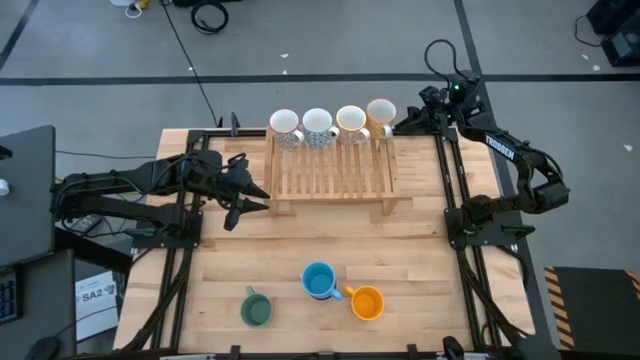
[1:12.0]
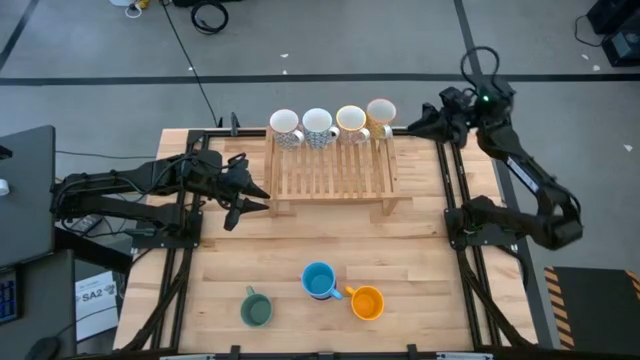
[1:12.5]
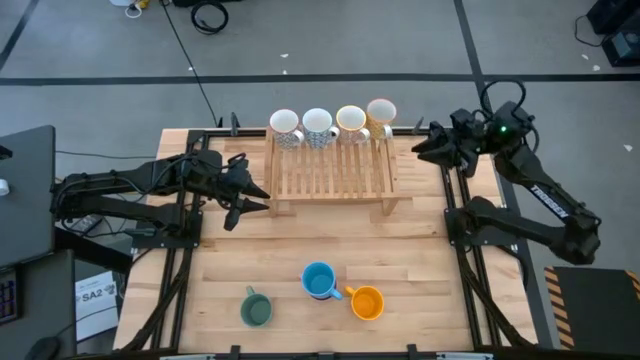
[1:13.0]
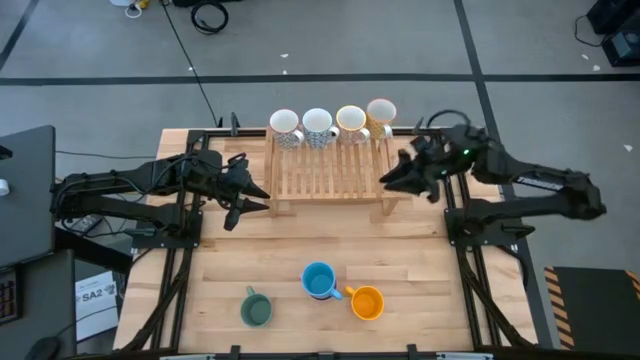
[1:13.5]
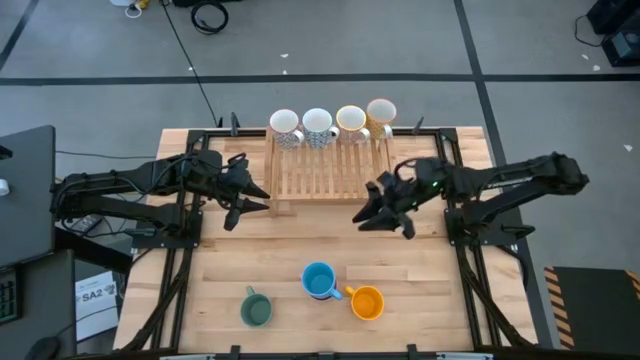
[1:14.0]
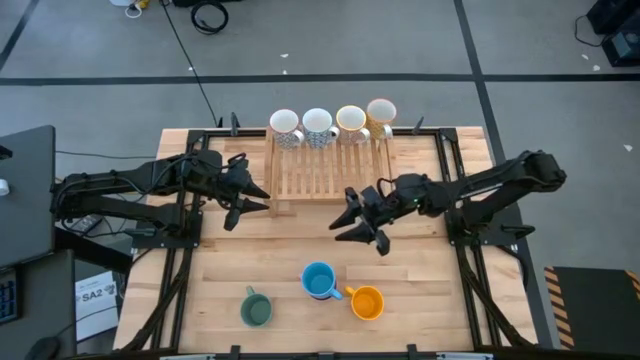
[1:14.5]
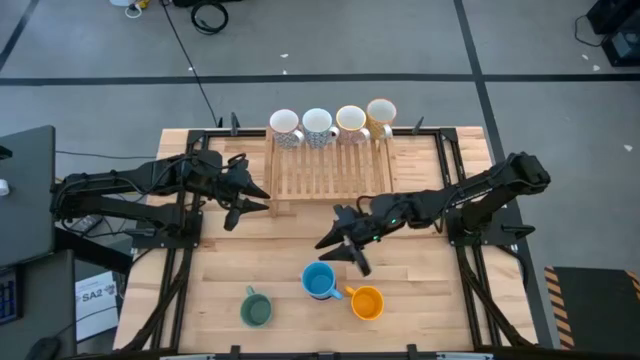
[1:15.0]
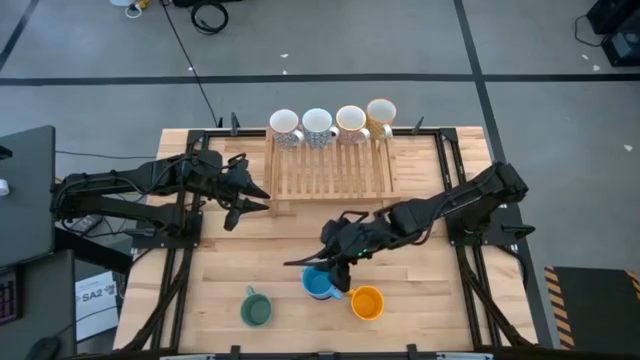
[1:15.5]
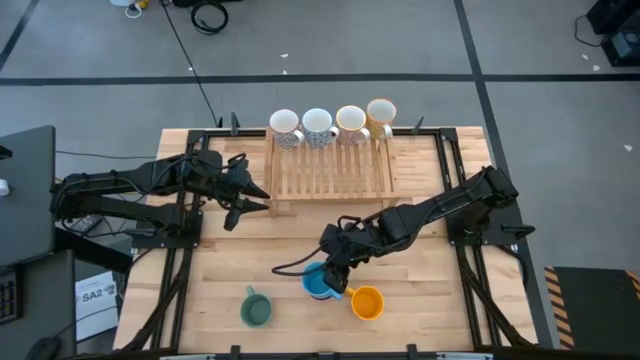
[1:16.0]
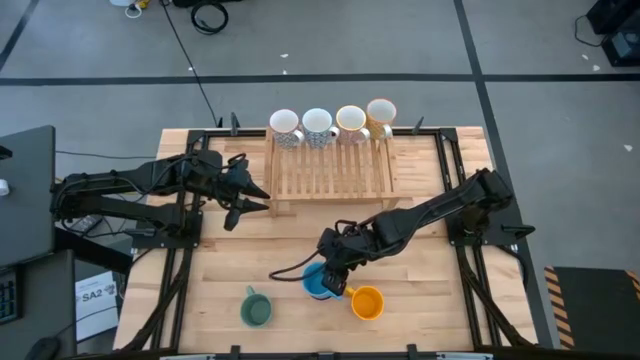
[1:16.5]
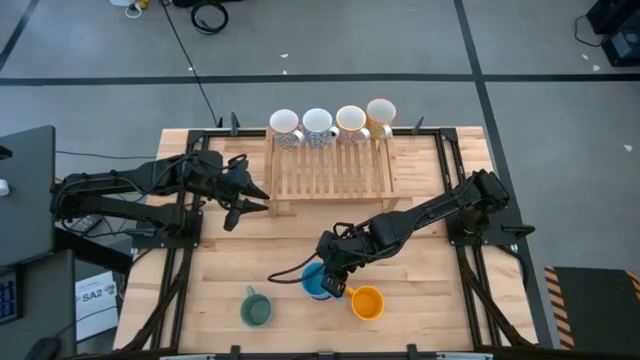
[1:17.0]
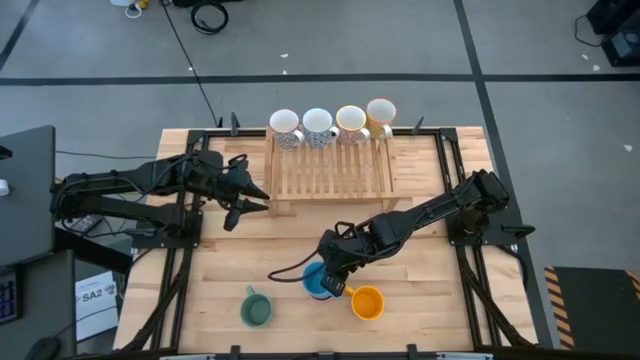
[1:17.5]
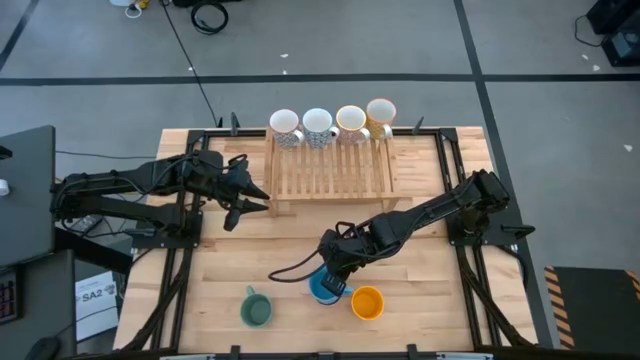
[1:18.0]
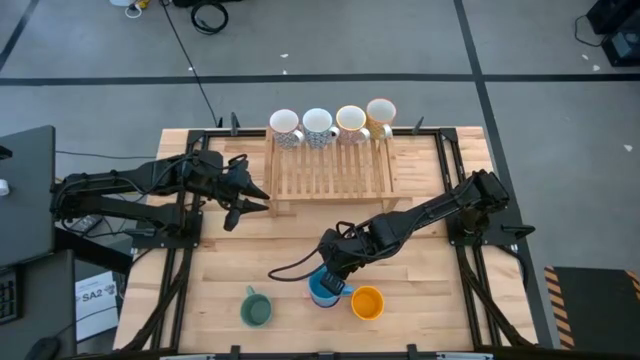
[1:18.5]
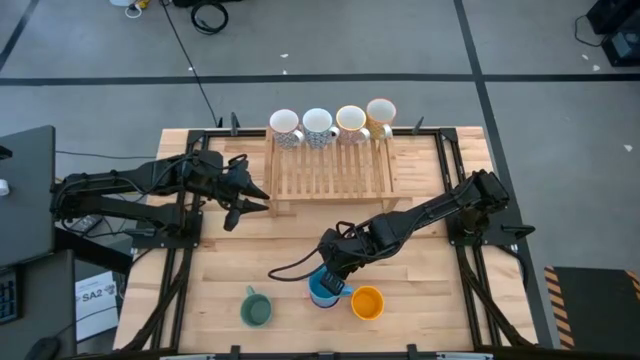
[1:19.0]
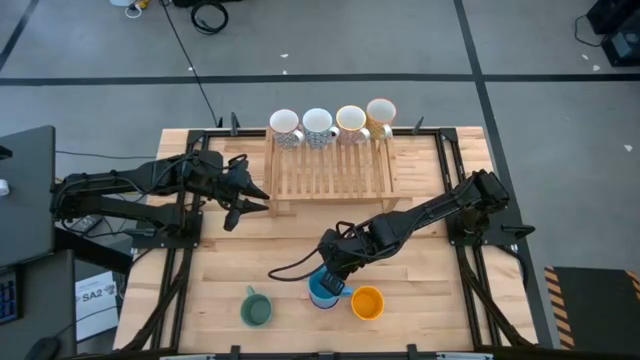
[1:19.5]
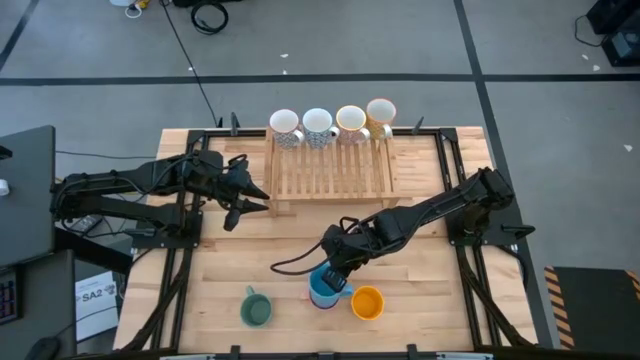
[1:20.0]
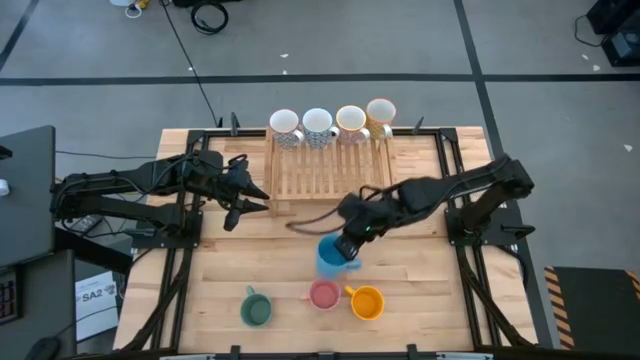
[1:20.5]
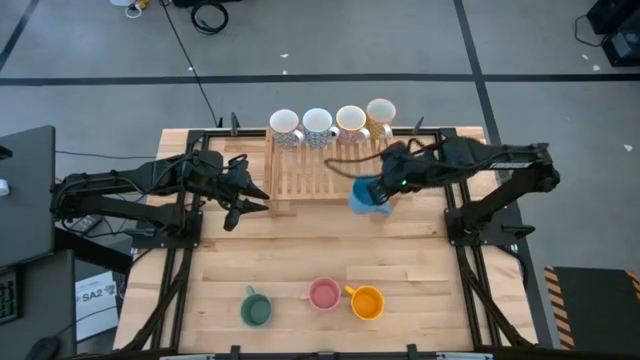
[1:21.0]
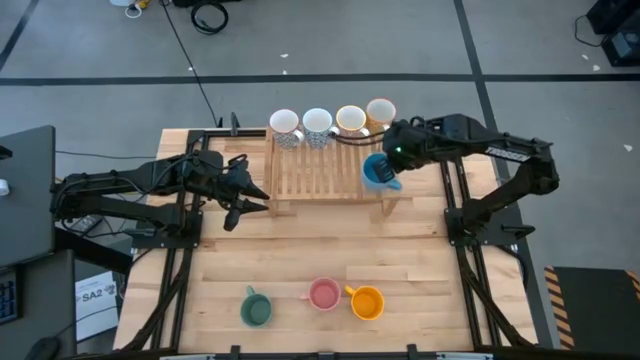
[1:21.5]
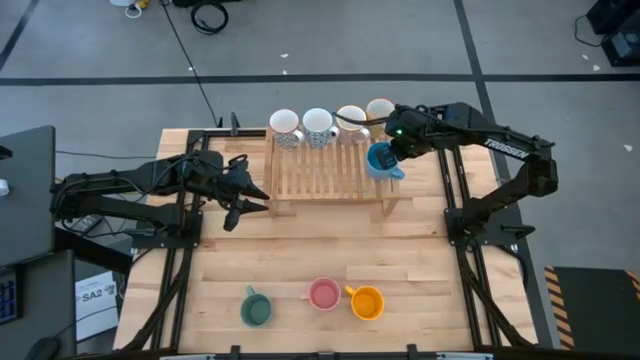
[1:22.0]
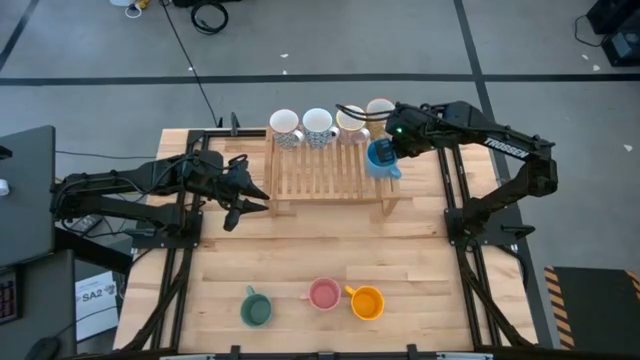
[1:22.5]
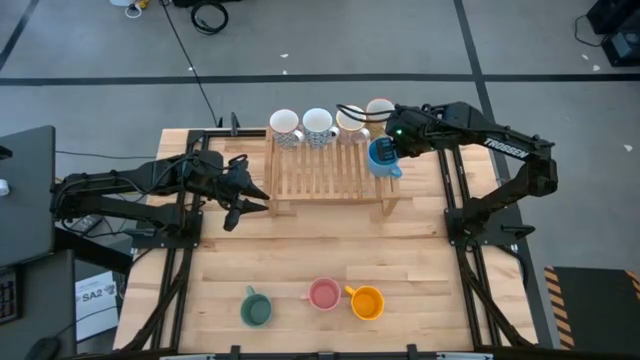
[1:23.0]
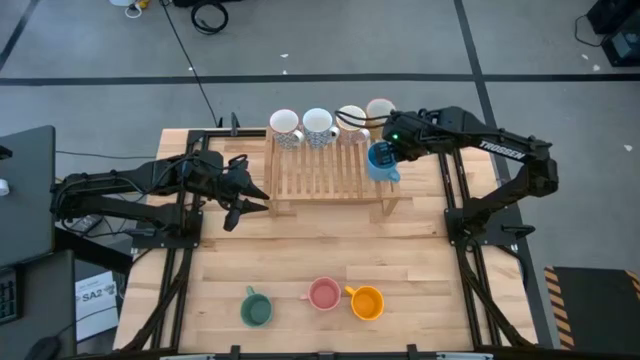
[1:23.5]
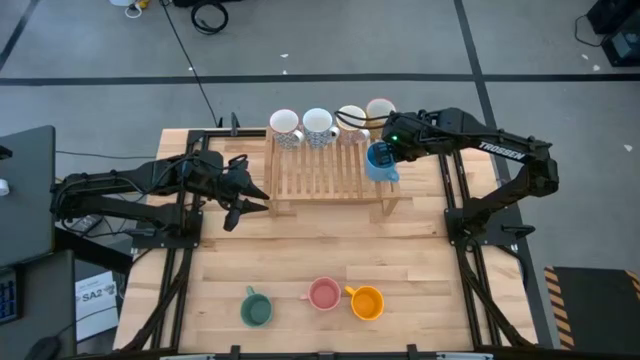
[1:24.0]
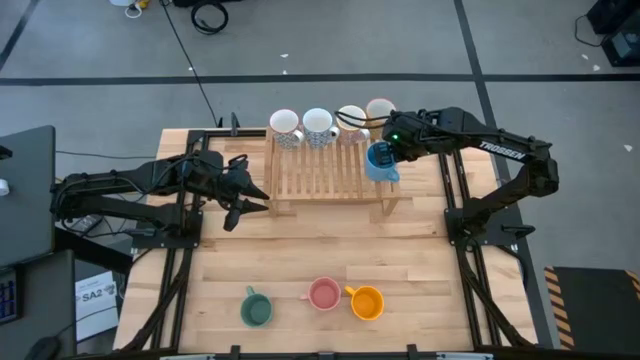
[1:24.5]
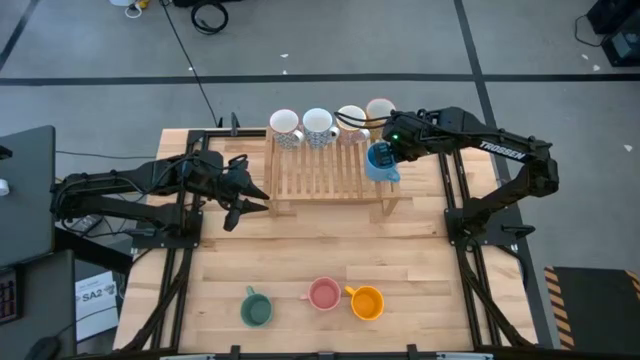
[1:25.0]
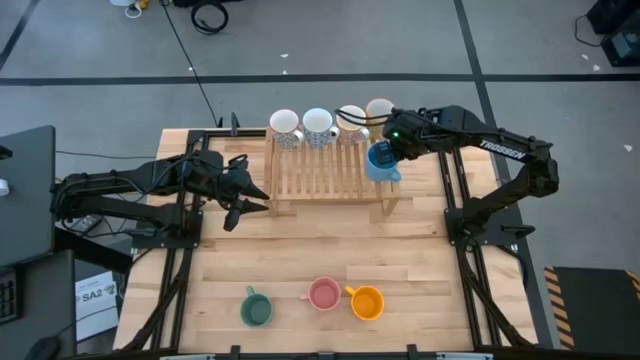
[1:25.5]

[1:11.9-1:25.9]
Task: Place coffee mugs
Put the blue mug on the shelf aligned with the yellow mug

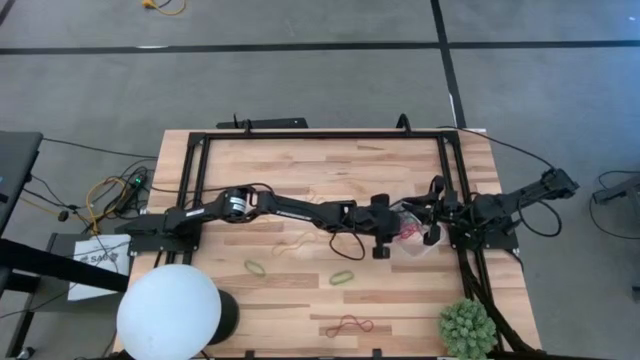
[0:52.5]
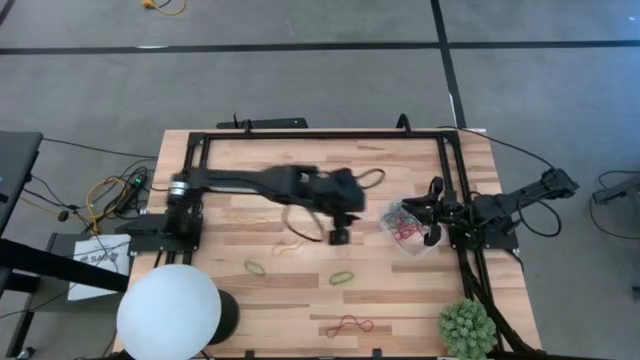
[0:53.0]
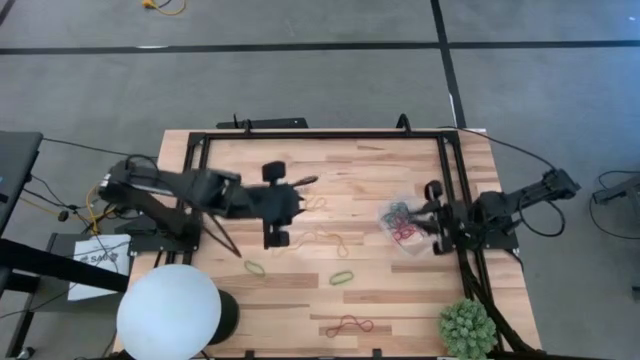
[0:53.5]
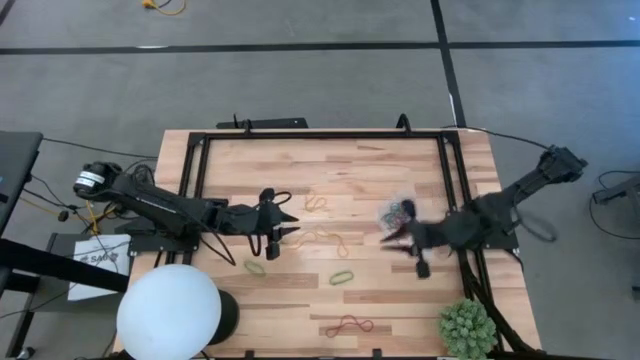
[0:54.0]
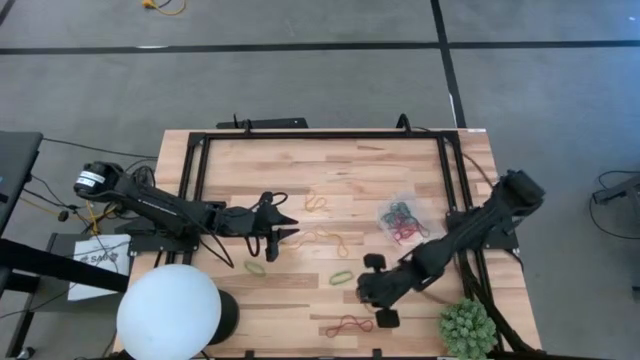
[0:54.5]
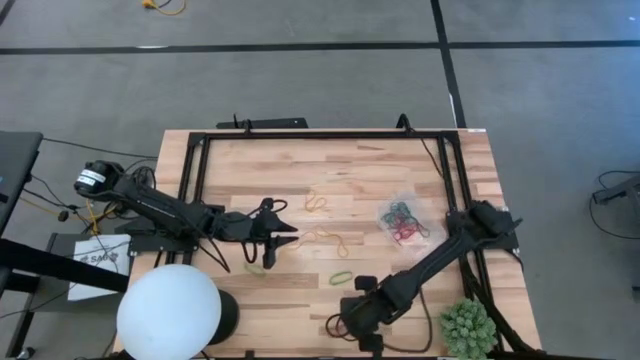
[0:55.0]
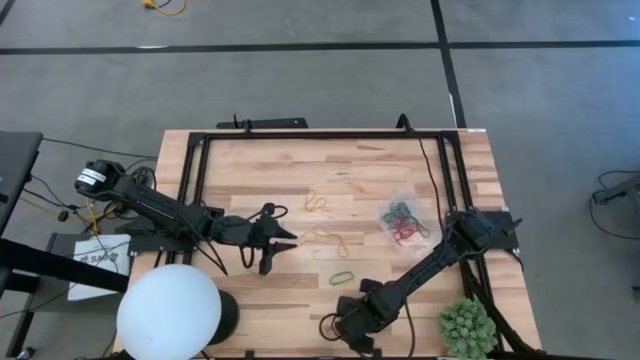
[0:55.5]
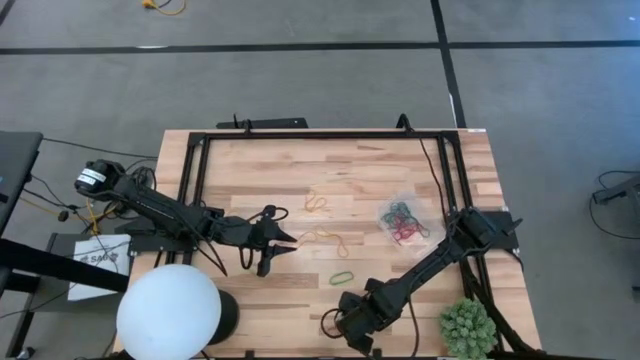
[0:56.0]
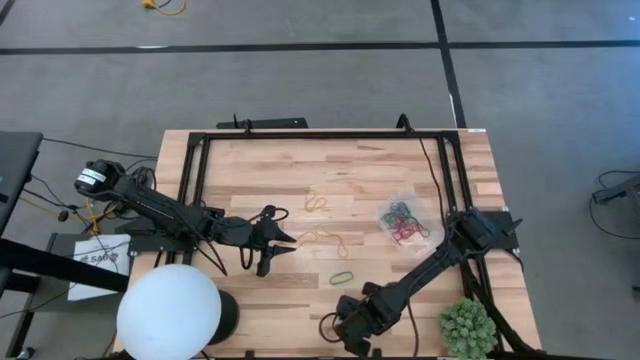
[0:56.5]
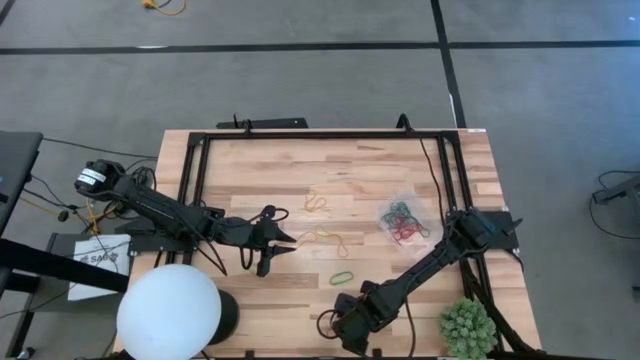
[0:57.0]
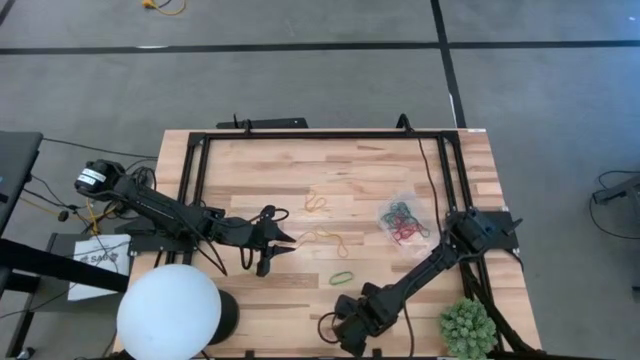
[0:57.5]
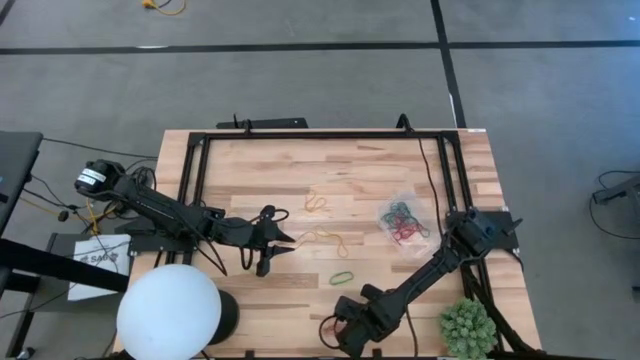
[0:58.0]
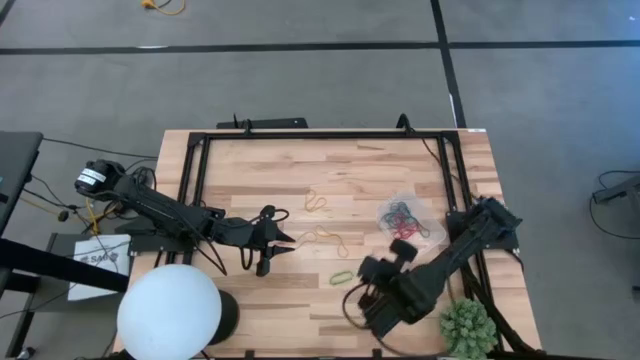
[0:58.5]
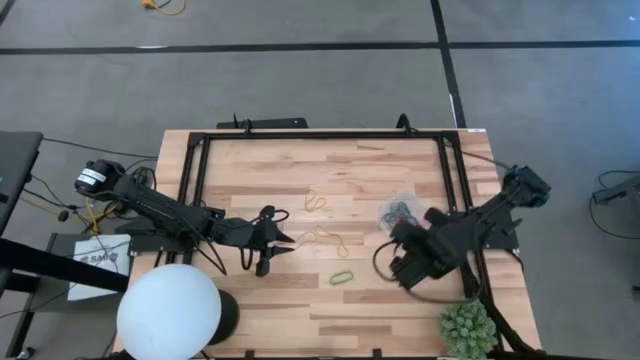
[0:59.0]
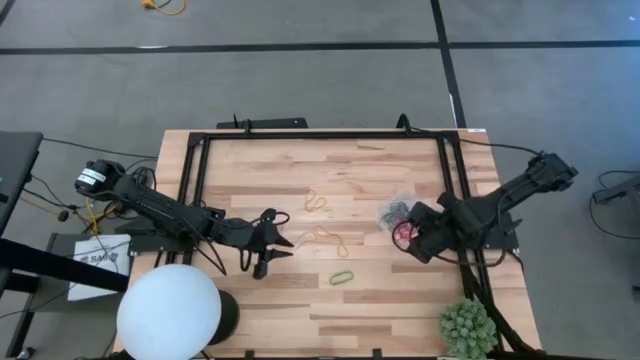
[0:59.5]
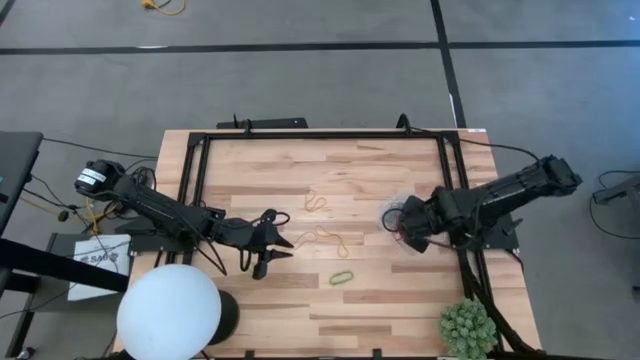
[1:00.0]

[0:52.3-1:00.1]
Task: Pick and place items into bin
Put the red rubber band into the transparent bin
